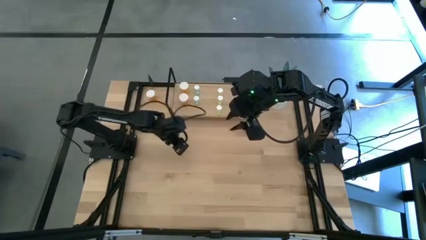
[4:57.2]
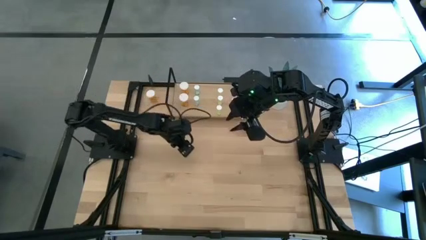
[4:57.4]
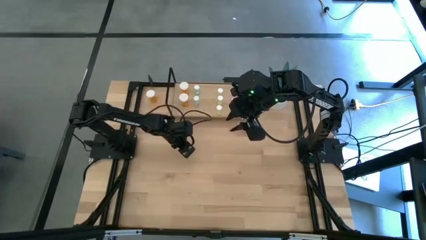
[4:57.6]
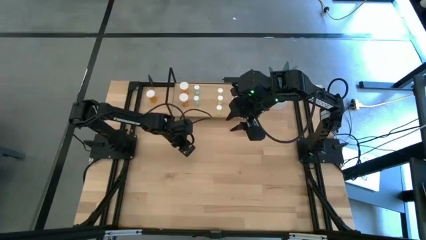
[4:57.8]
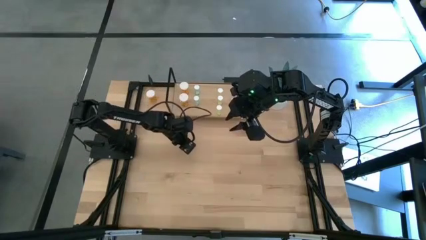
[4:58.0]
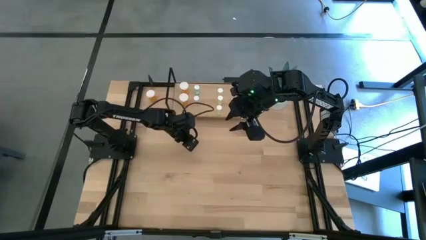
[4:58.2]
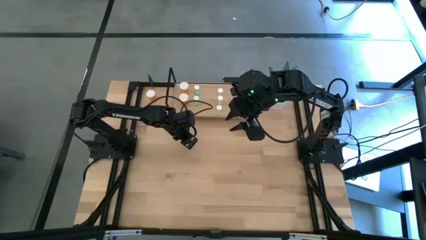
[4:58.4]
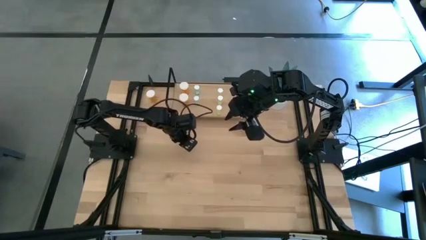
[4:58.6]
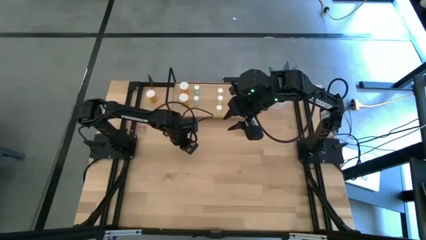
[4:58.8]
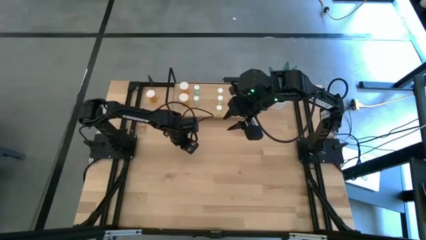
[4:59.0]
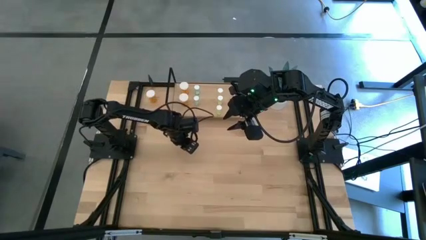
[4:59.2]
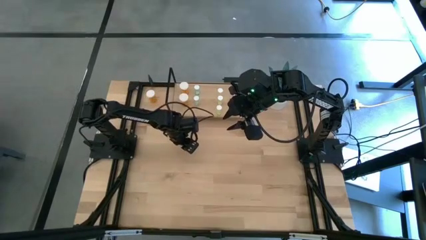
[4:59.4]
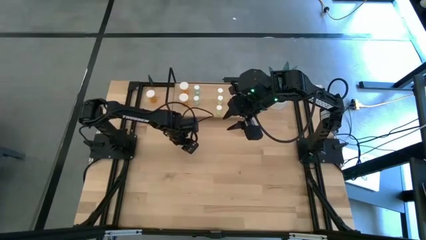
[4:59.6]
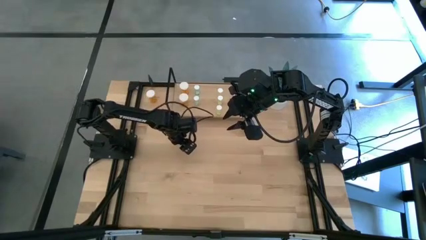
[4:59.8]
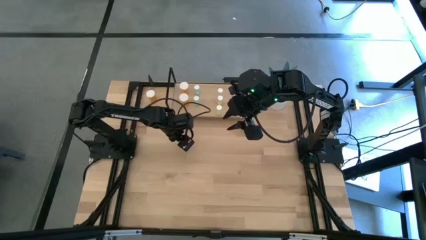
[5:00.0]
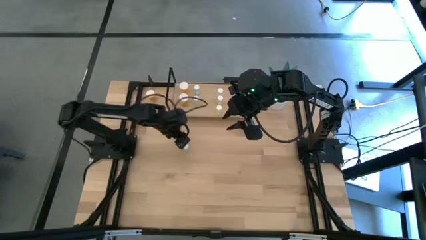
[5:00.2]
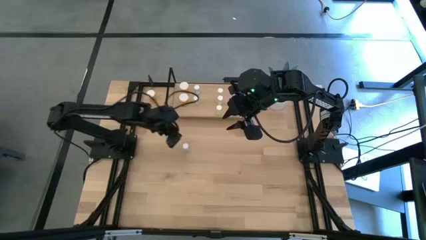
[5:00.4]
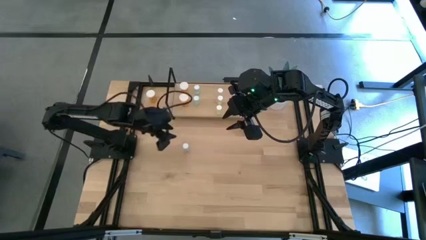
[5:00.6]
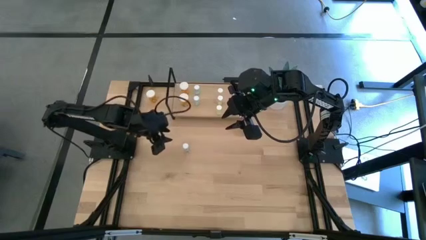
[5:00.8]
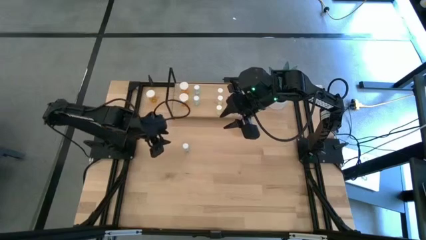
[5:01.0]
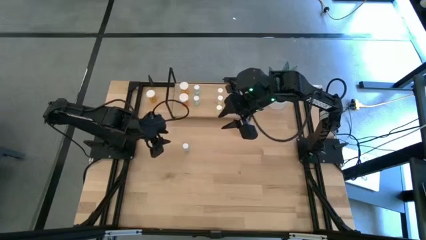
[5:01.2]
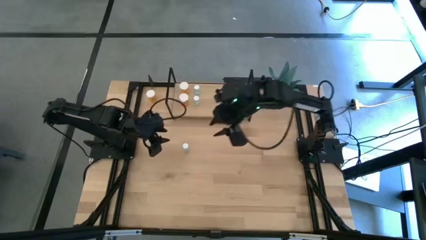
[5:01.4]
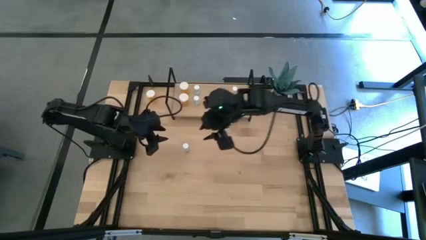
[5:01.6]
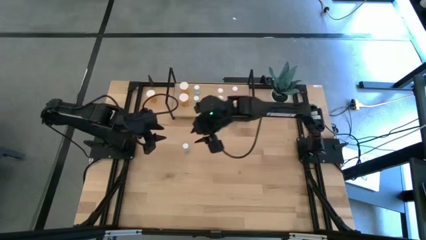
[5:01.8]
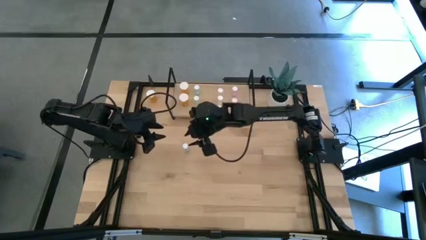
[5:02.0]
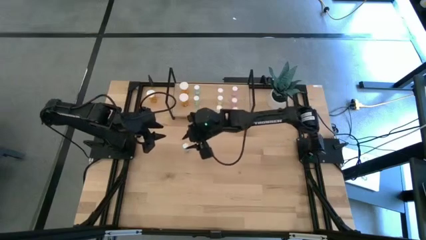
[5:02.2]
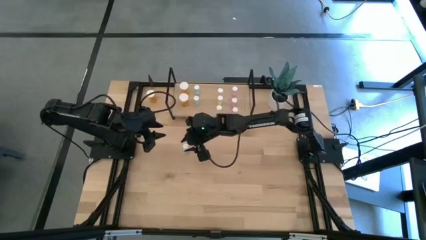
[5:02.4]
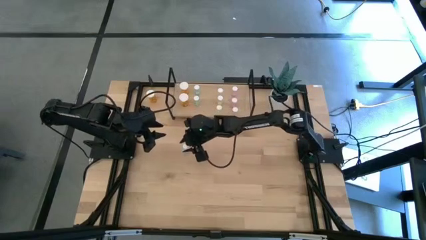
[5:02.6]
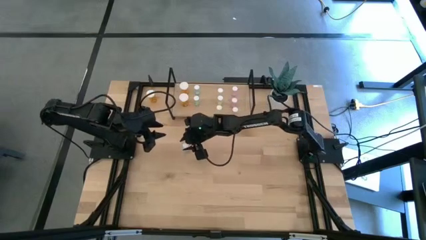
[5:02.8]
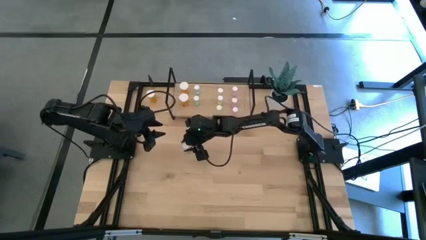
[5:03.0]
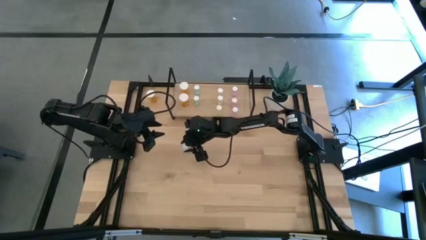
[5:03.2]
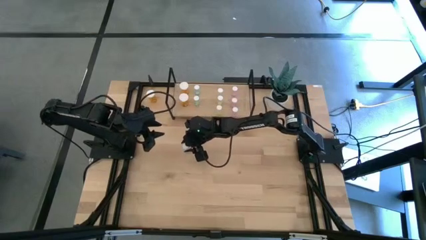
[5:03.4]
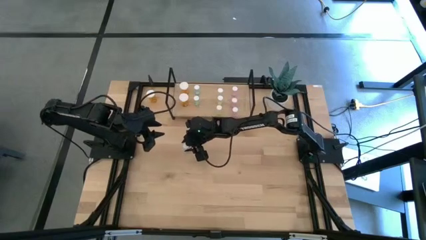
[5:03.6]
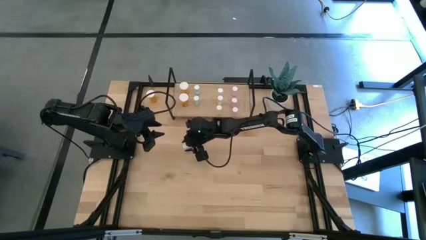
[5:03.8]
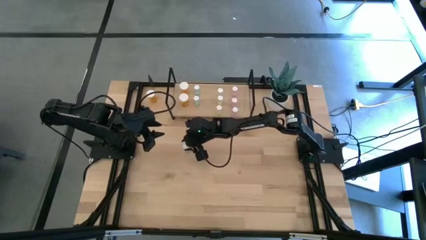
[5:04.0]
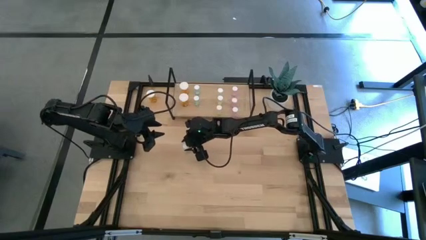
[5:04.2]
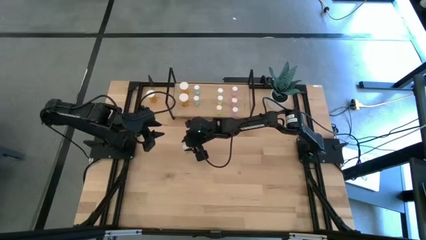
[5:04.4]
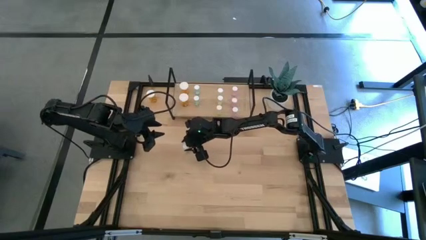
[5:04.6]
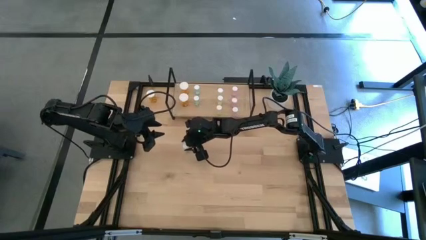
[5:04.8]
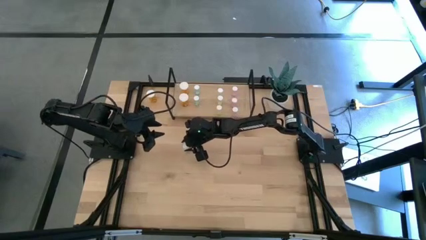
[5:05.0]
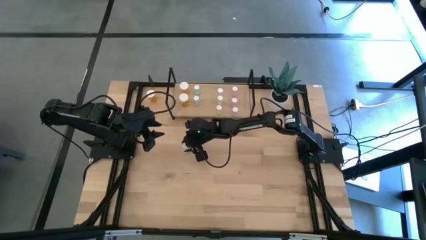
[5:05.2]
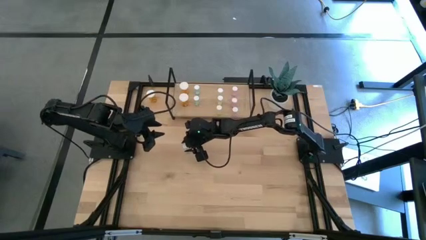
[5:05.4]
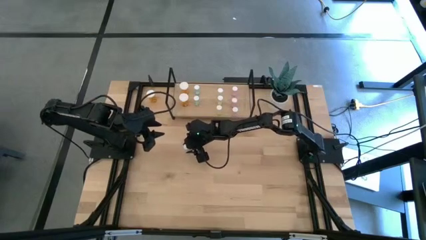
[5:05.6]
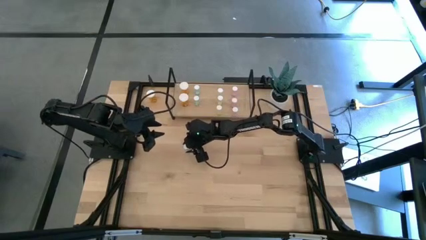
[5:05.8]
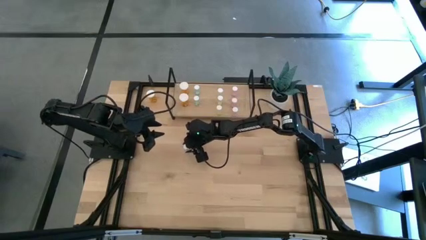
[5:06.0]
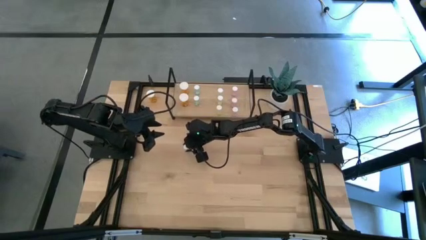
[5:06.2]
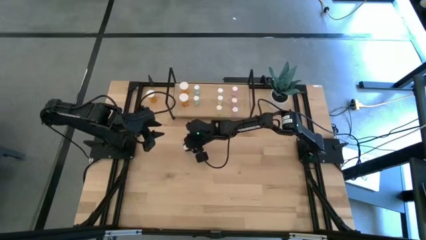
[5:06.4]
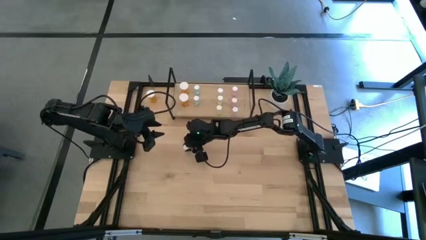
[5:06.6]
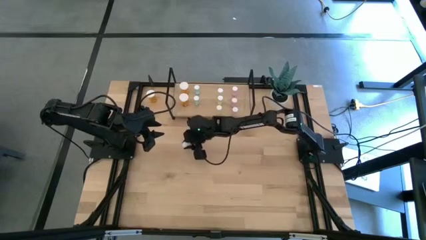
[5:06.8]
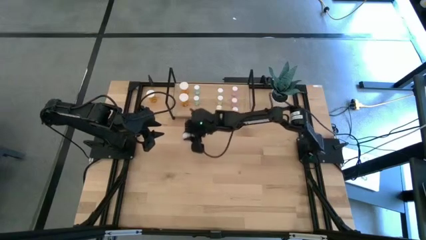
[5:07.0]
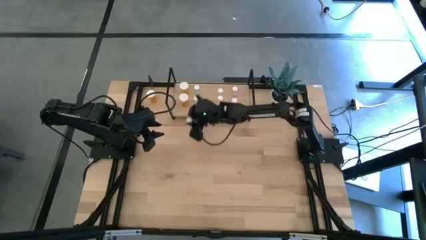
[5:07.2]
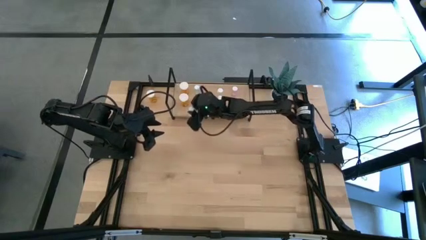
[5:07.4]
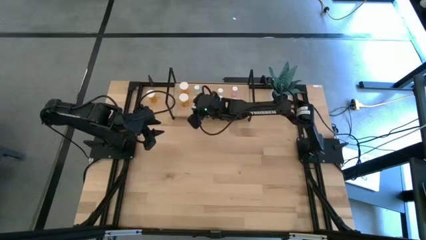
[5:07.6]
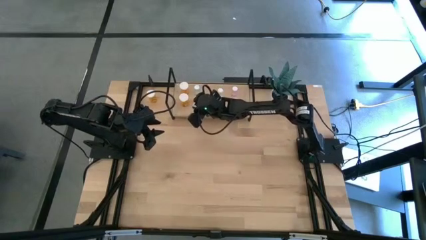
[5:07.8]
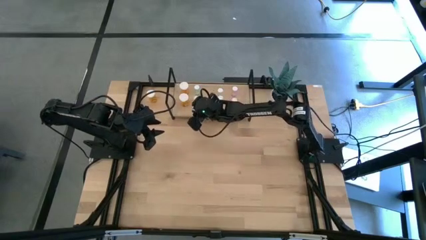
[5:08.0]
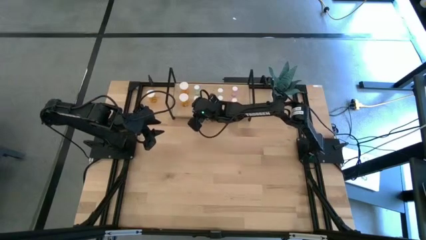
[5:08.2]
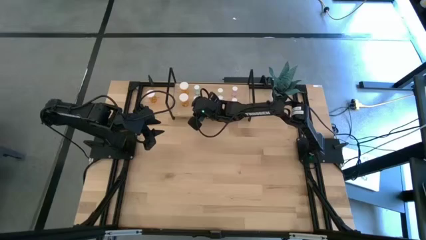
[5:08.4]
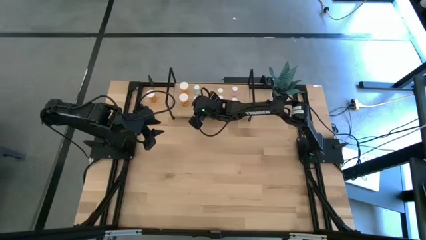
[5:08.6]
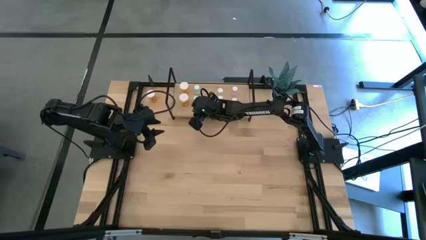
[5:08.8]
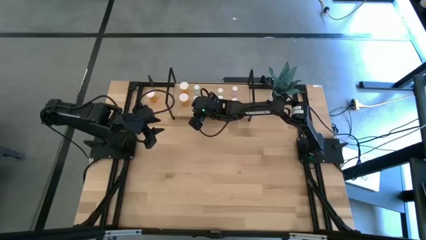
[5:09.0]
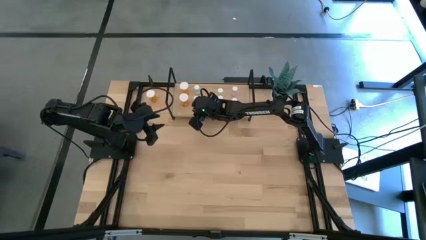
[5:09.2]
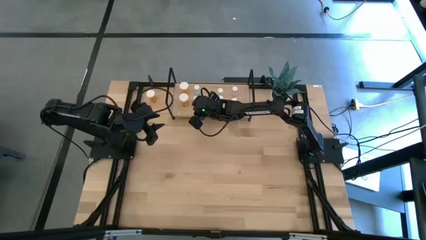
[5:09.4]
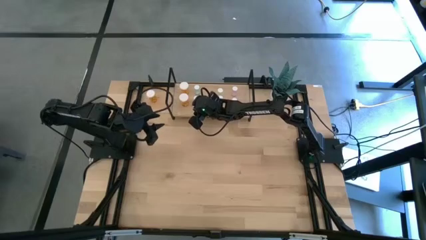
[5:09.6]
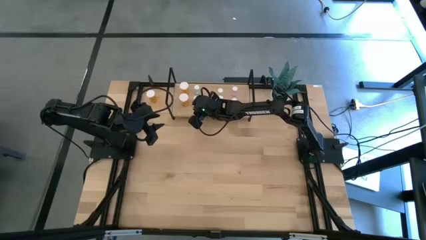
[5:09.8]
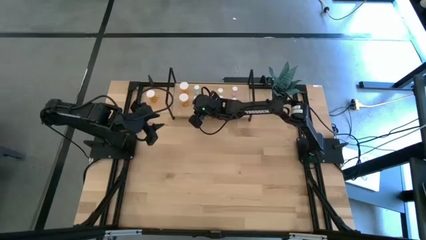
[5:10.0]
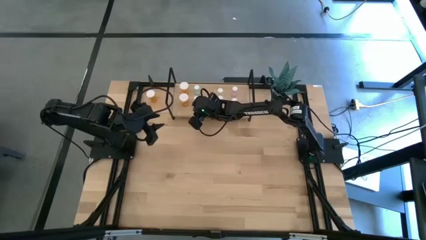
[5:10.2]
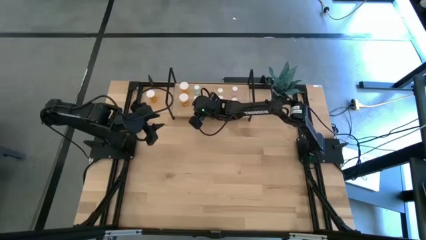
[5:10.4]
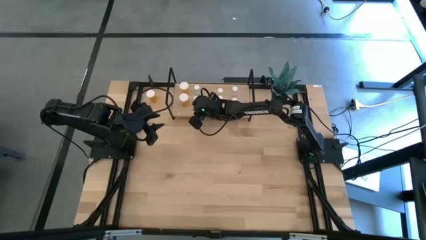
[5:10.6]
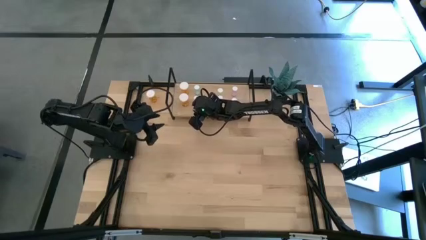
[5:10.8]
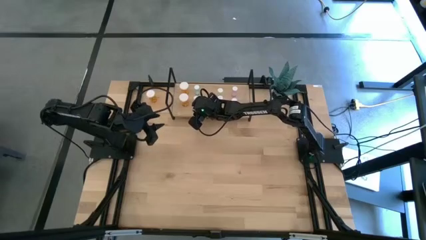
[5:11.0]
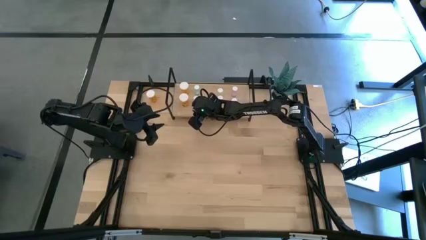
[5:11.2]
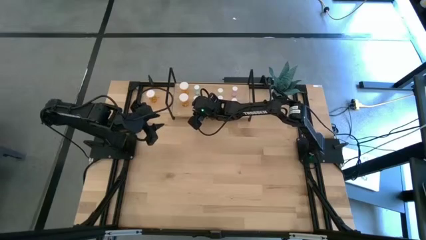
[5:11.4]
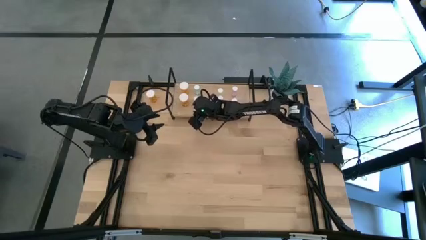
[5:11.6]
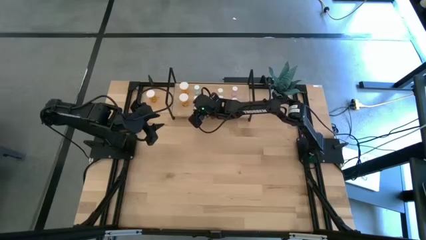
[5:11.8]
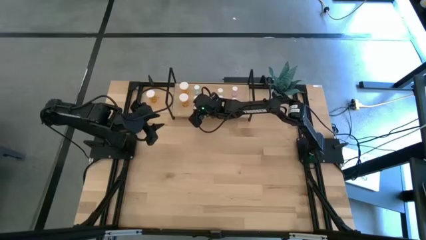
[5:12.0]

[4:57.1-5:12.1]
Task: Pick and place medicine bottles onto shelf by color
Put the blue pill bottle on the shelf aligned with the other blue pill bottles
